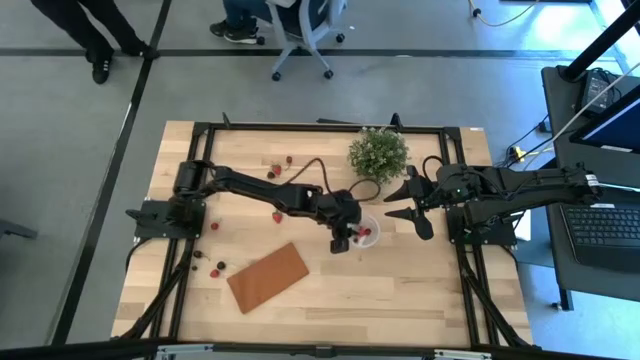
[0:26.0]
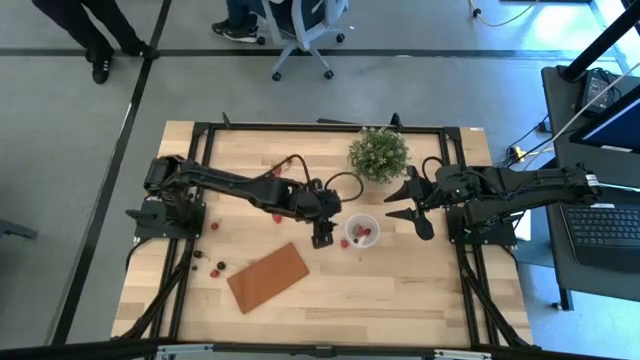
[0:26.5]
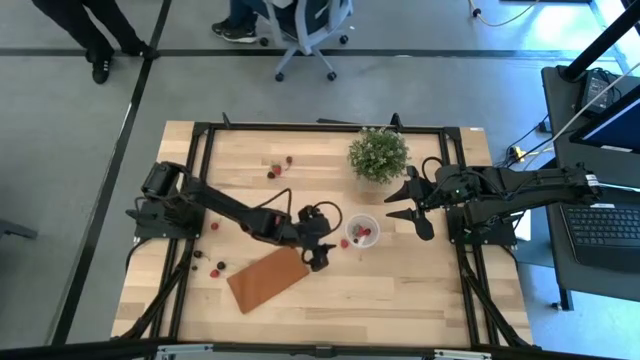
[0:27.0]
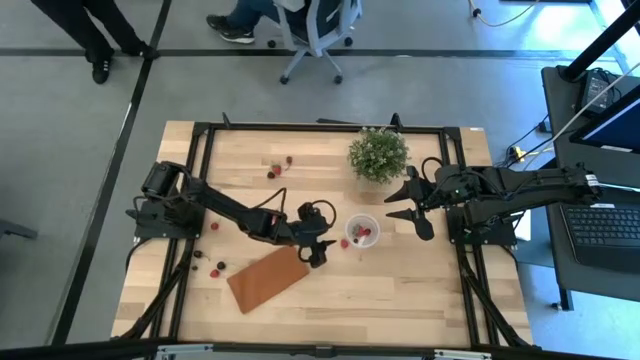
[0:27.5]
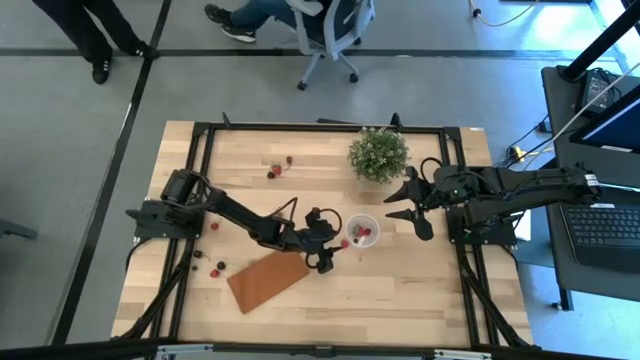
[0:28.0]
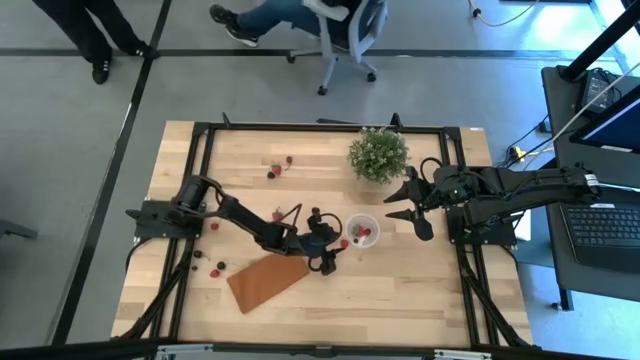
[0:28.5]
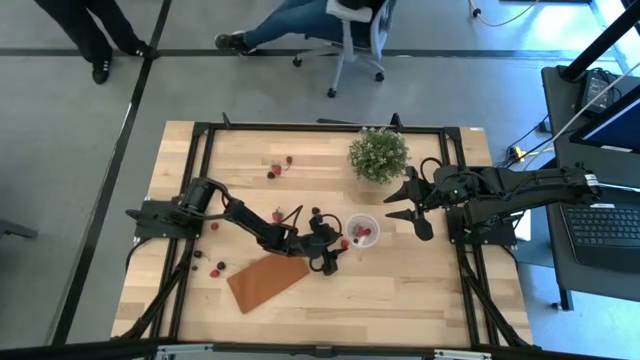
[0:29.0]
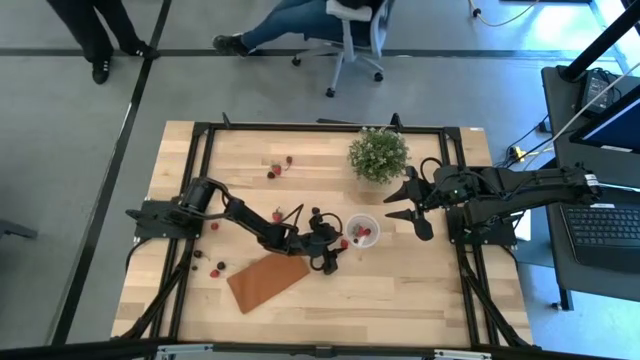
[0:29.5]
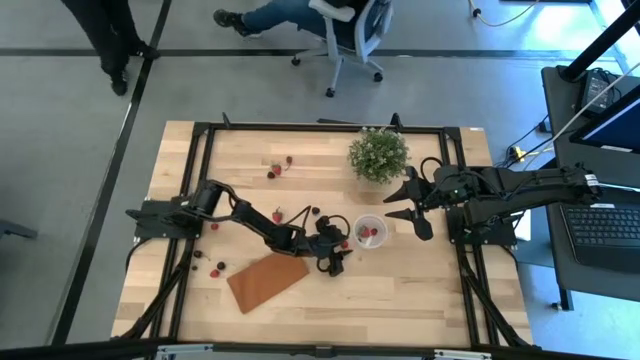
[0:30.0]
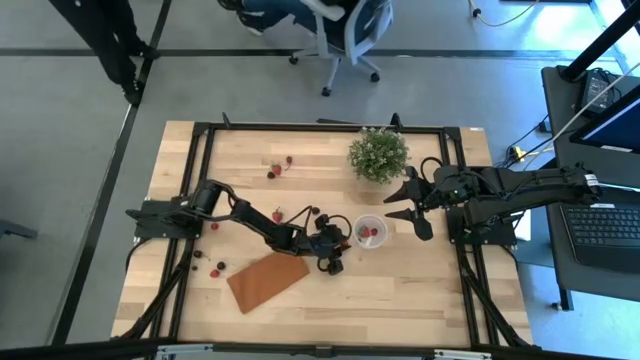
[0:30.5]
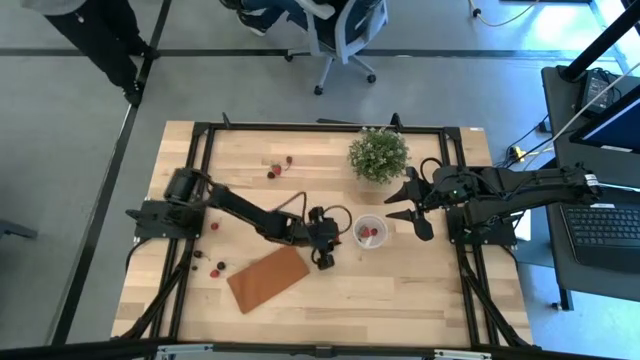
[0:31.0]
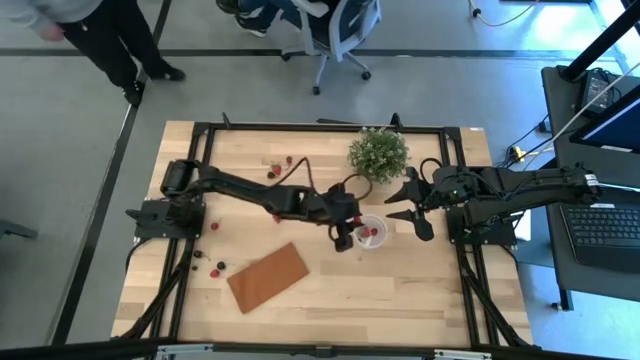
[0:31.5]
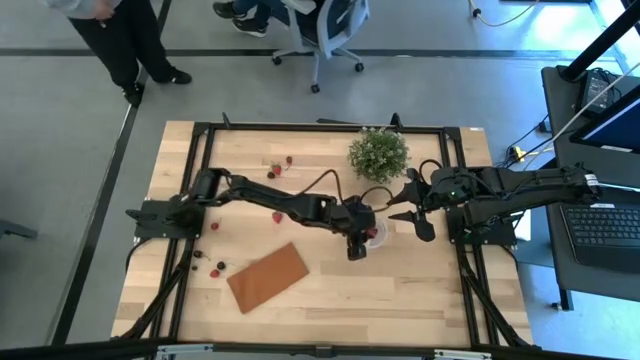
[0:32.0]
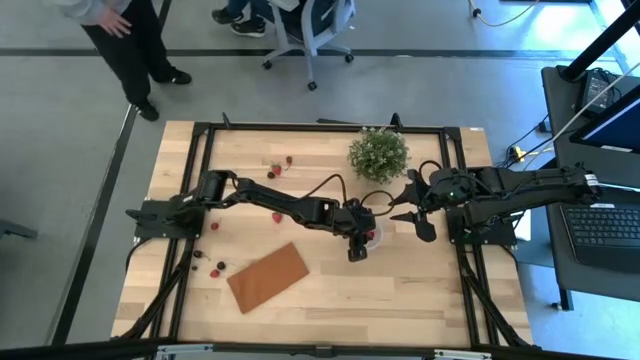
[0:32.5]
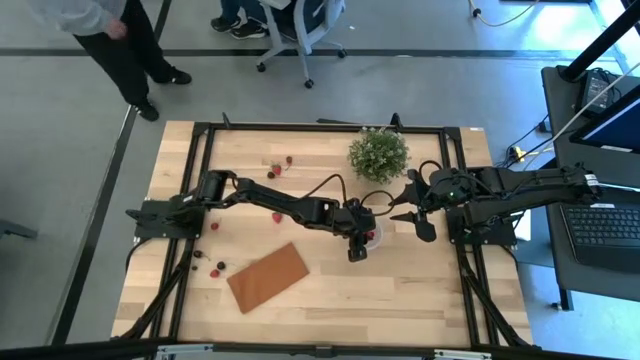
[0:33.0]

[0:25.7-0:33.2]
Task: Pick and placing Produce into tupperware
Put the red raspberry into the transparent container

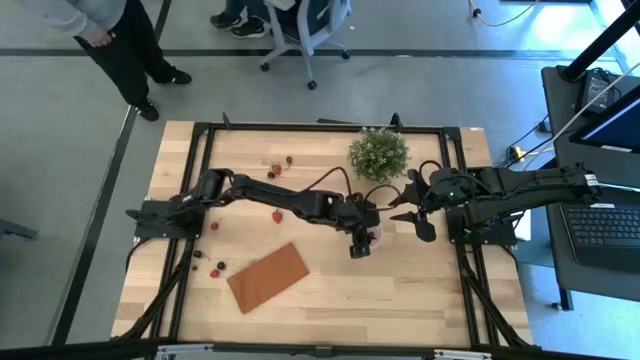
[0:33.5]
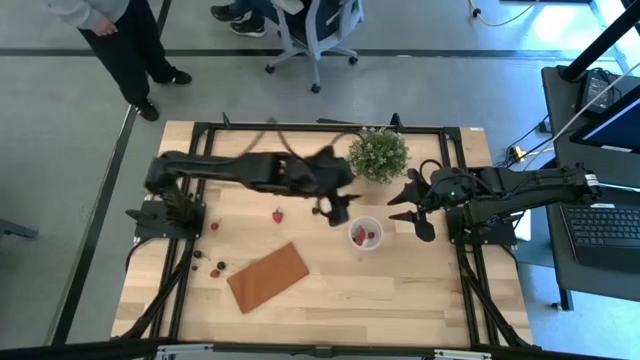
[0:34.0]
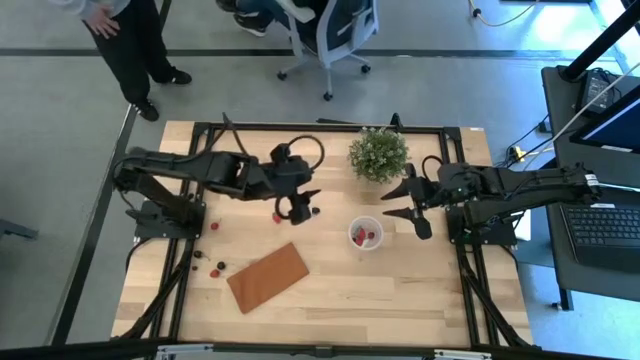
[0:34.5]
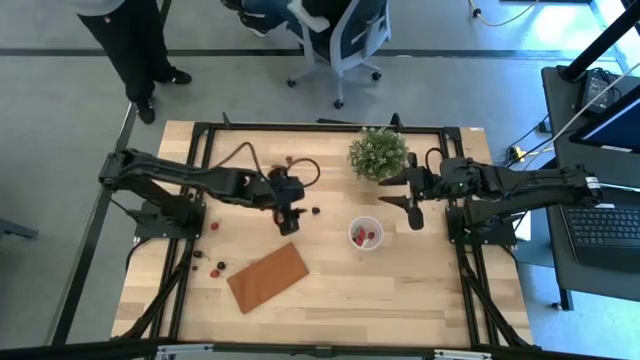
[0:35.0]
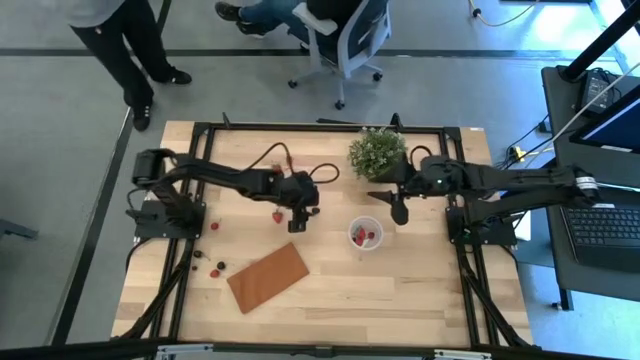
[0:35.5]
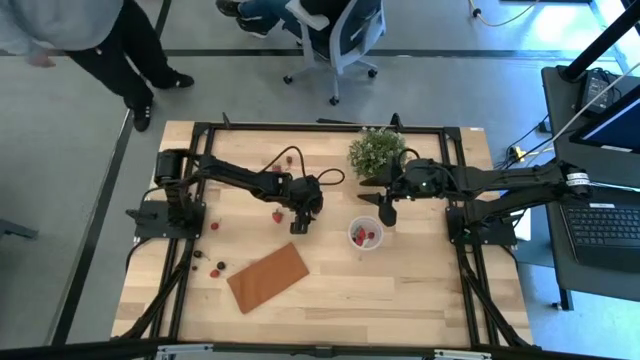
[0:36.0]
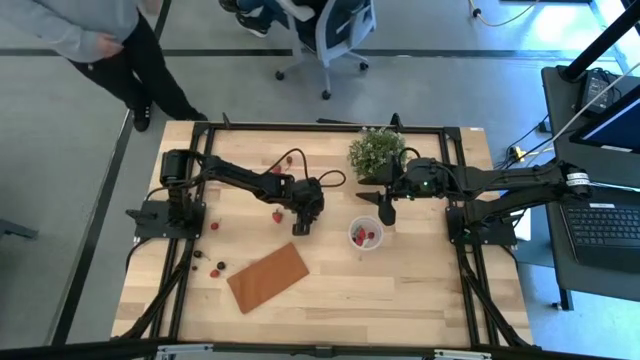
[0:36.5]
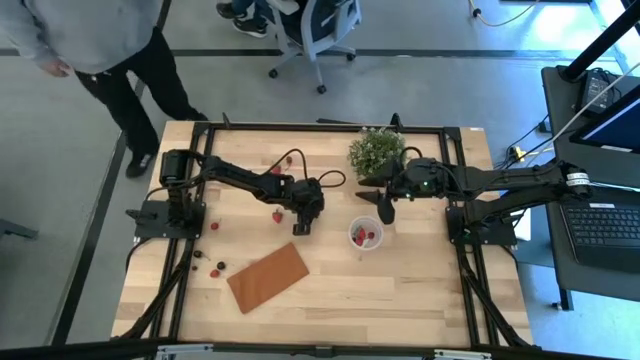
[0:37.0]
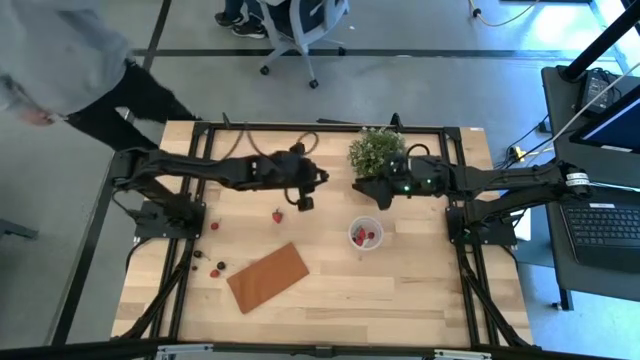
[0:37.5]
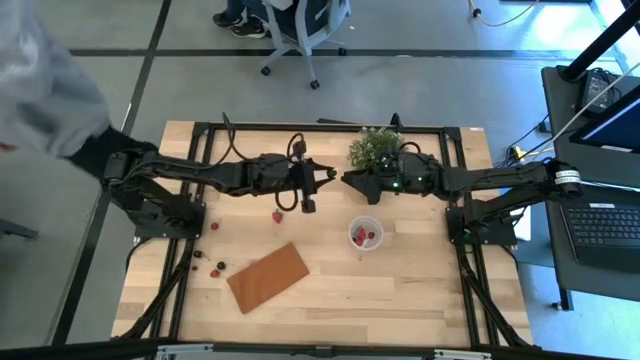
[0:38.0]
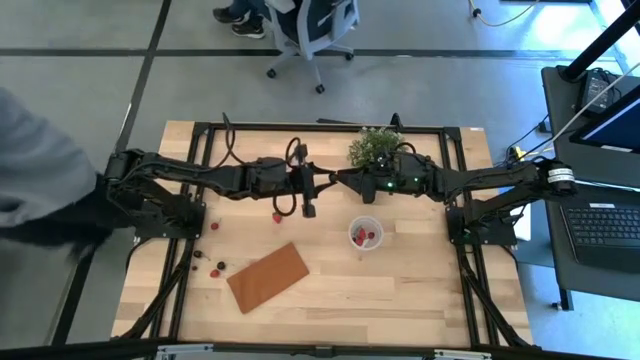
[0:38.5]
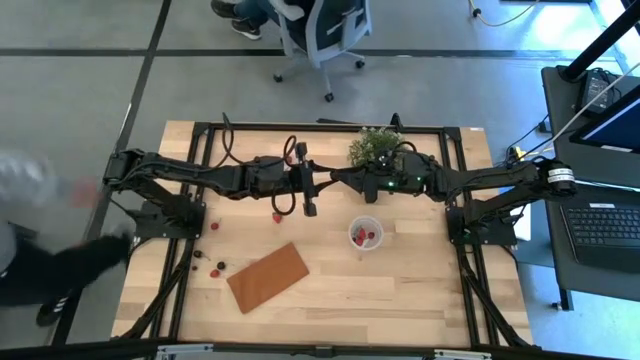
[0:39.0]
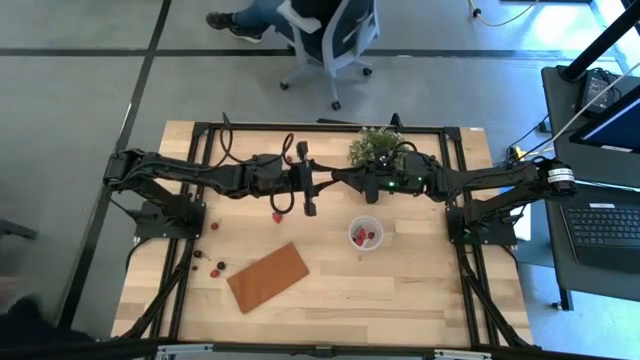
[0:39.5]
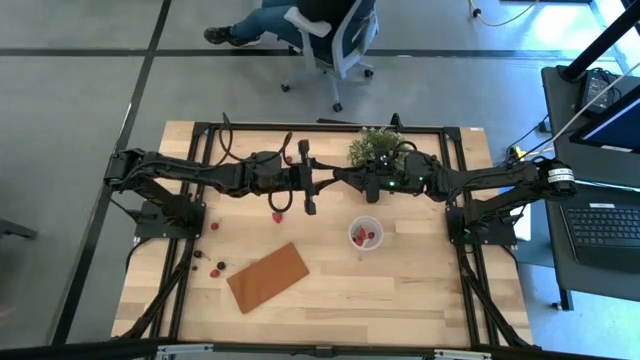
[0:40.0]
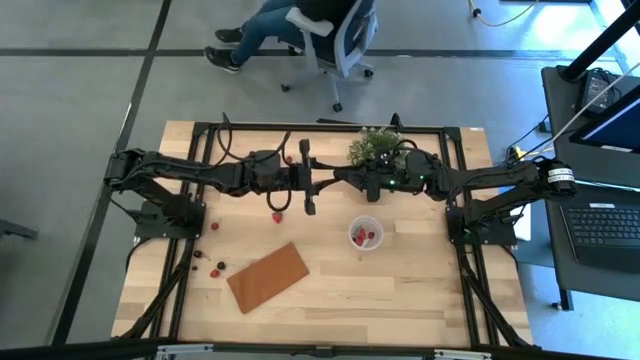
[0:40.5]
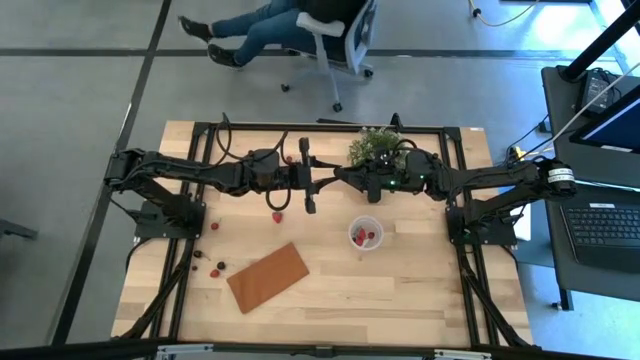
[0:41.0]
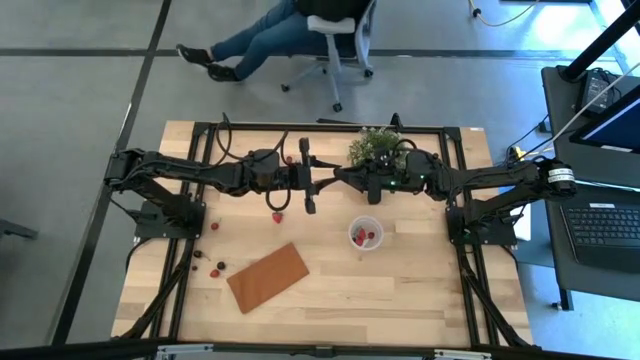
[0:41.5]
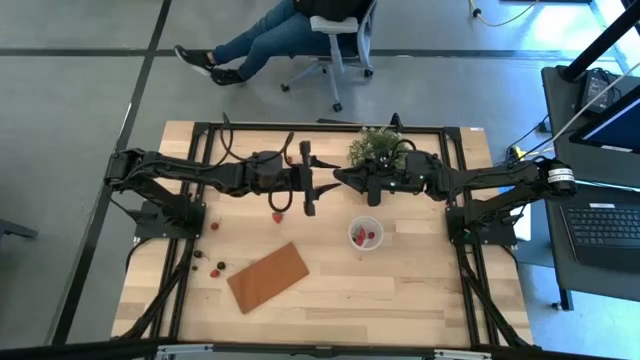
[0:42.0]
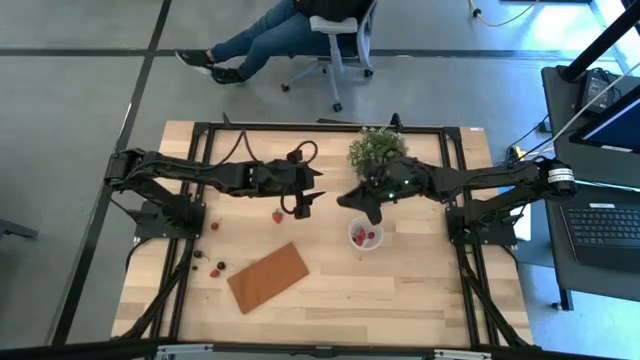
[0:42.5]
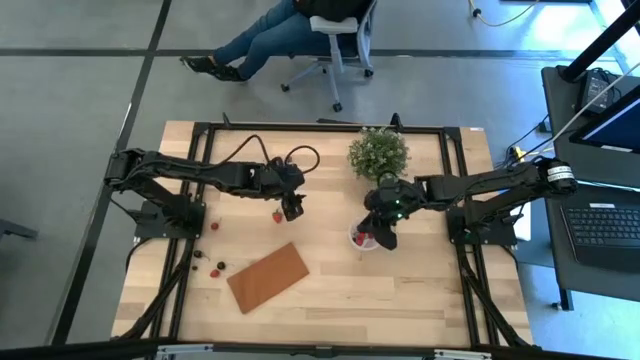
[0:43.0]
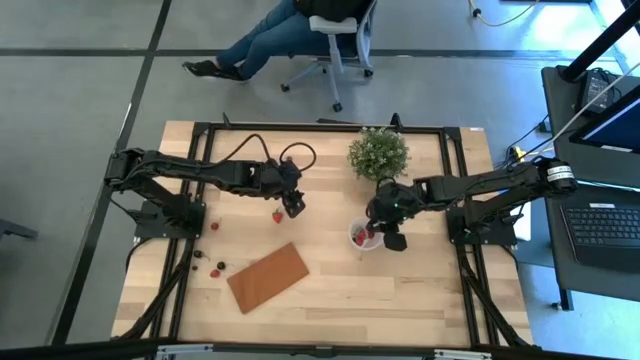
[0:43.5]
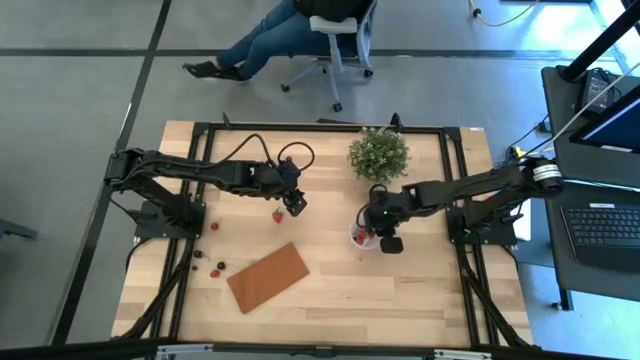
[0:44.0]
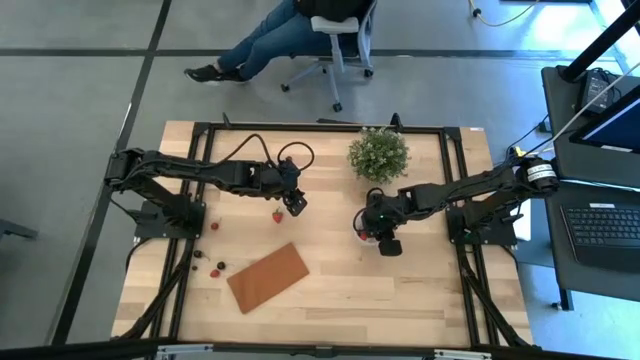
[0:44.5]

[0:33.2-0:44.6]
Put the blackberry into the transparent container
